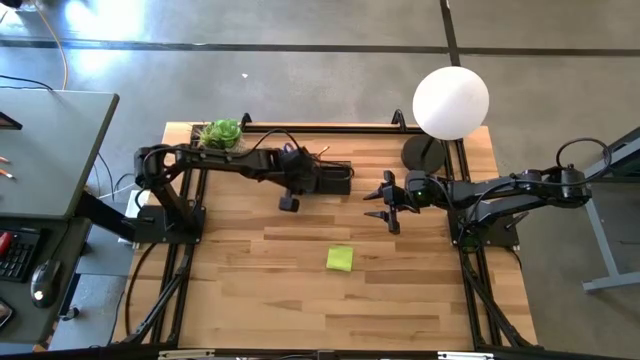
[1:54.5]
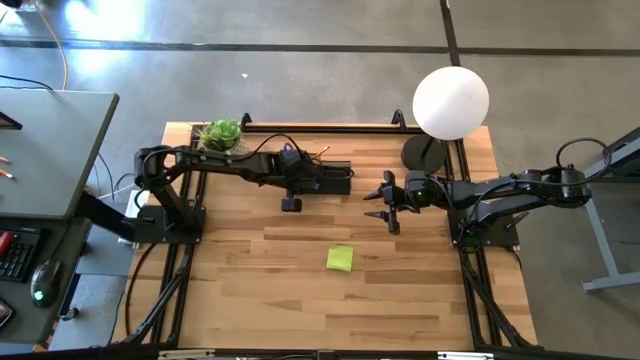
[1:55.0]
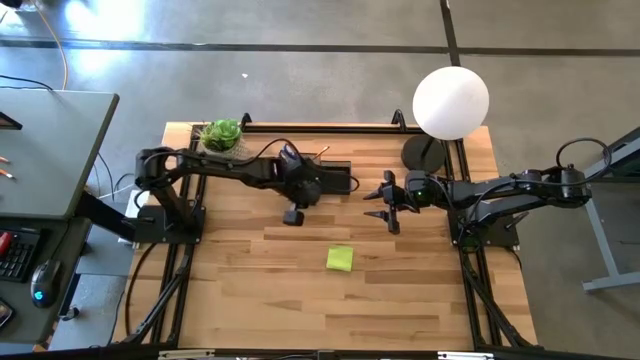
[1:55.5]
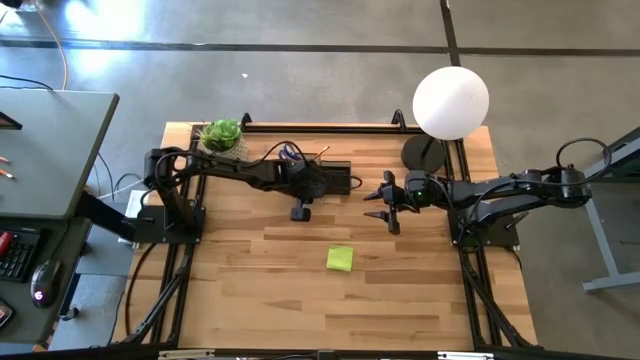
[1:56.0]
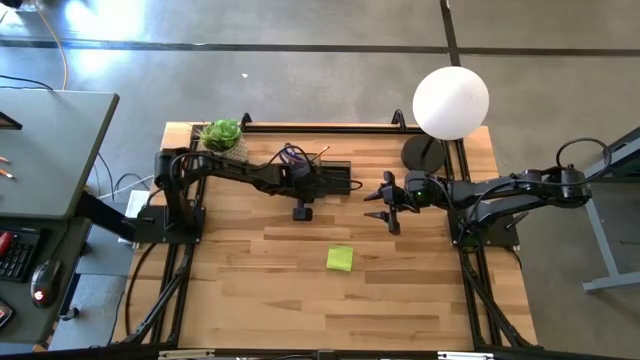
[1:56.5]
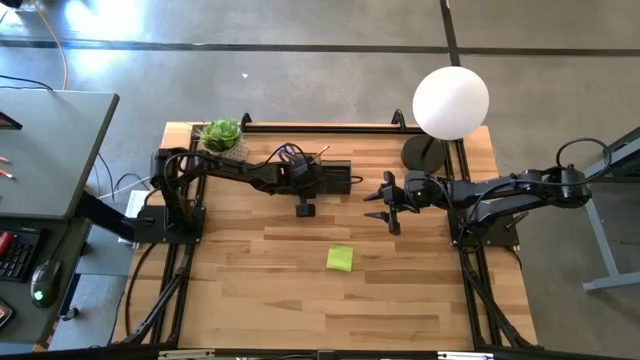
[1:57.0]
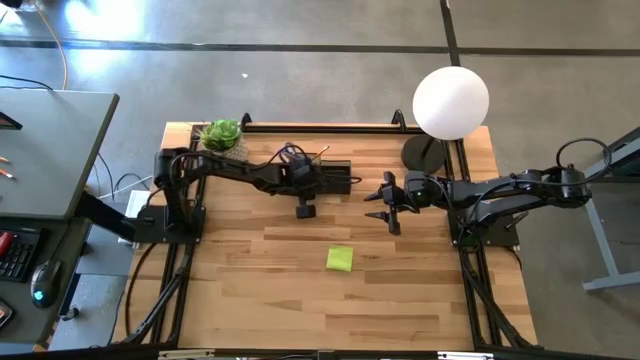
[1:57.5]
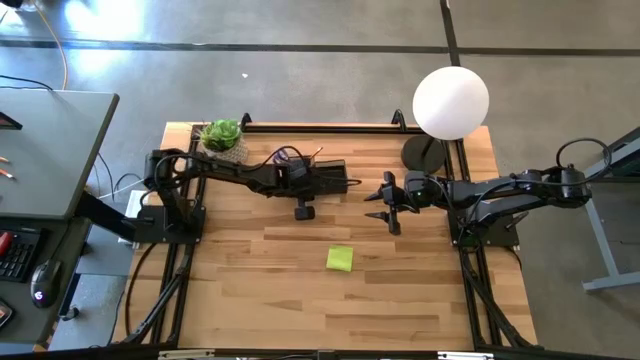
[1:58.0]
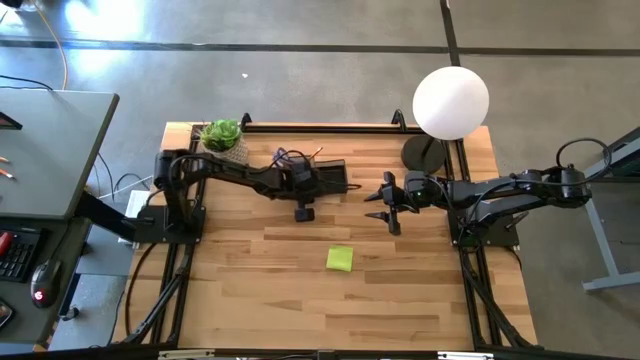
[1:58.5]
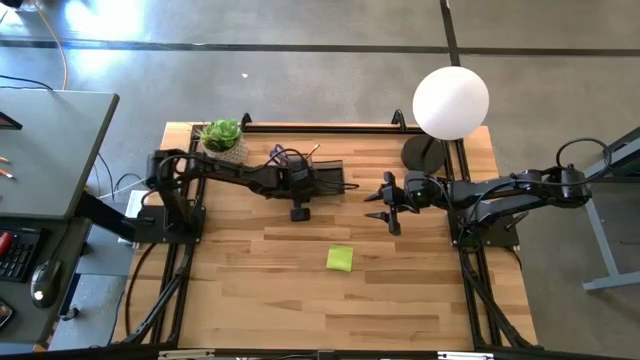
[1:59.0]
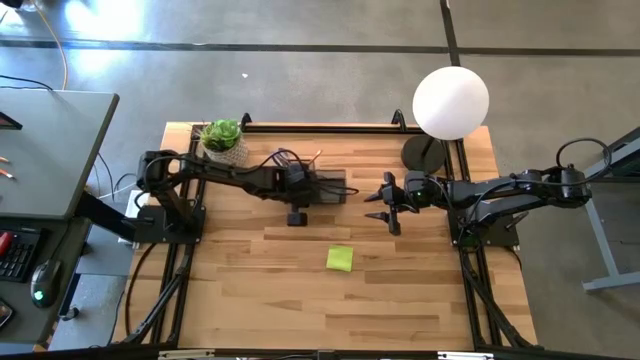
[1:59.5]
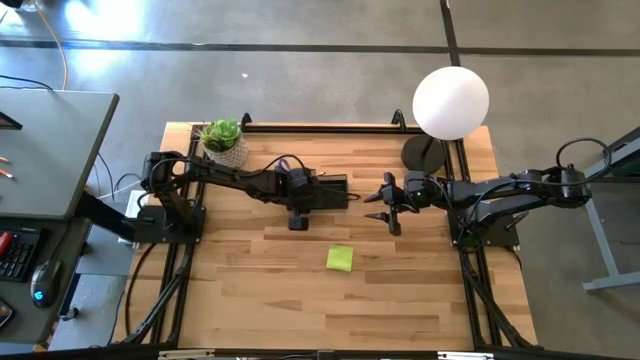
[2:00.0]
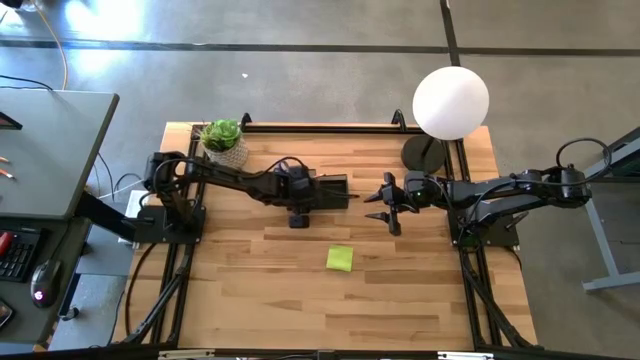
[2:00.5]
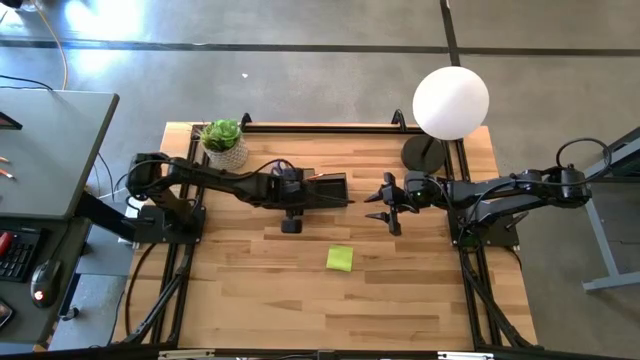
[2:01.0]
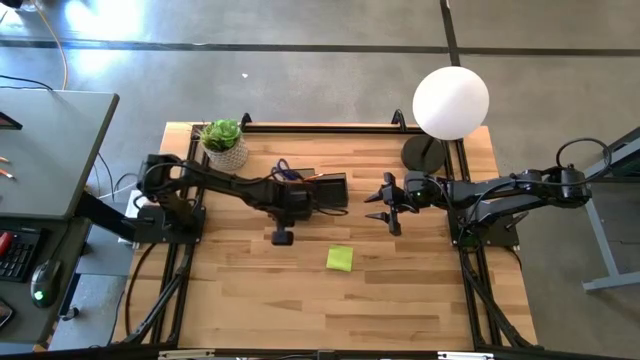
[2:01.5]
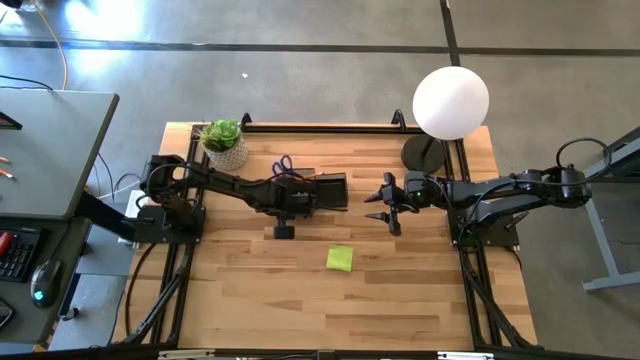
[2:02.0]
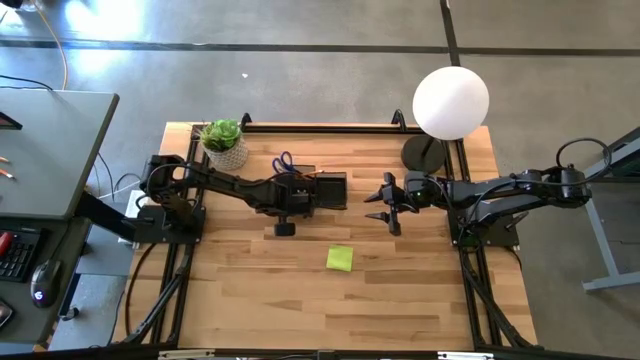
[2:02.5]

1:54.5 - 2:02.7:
Task: Pick and place office supplies into organizer
Adjust the black desk organizer

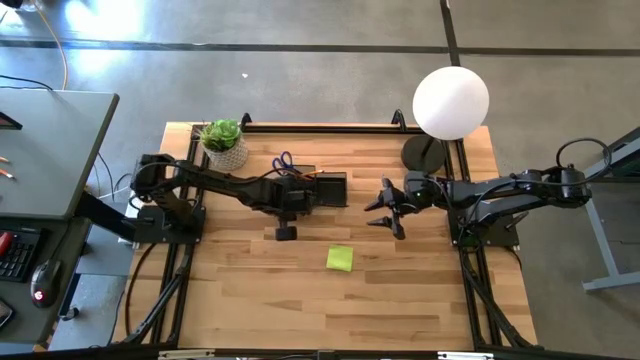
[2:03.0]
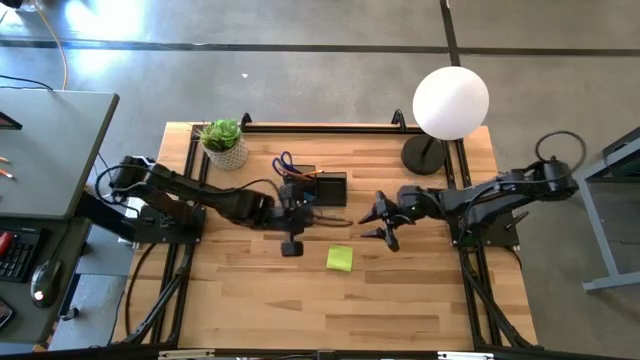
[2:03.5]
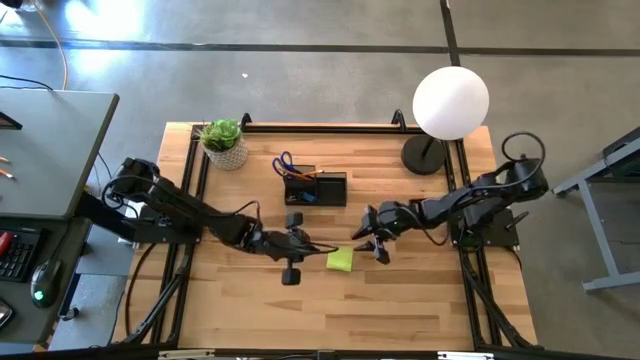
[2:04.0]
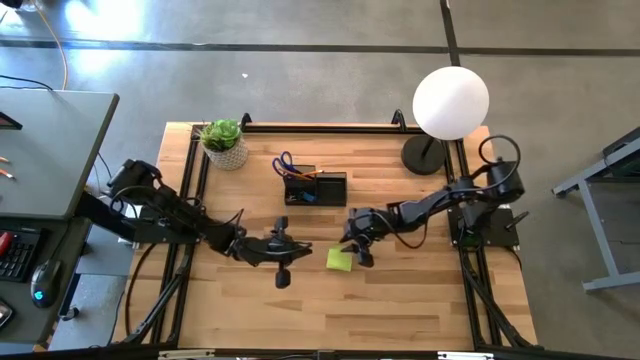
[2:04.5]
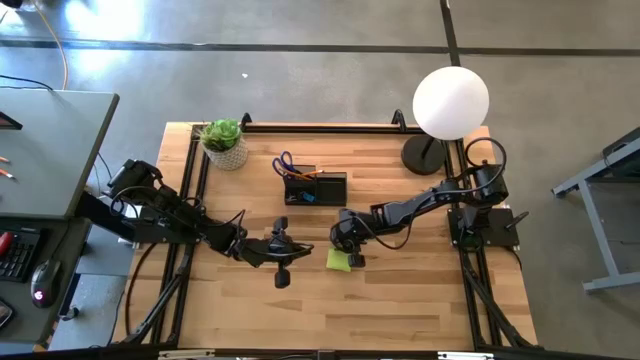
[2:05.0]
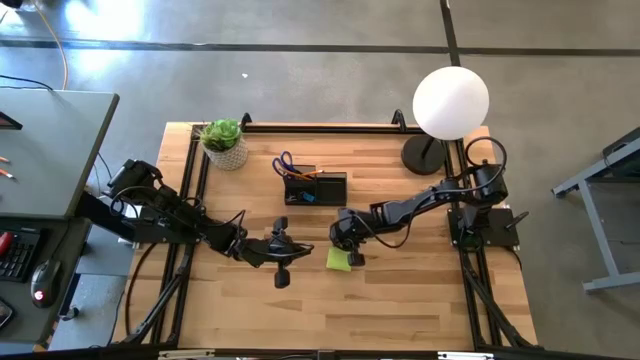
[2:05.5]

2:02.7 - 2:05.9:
Put the green sticky notes into the black desk organizer

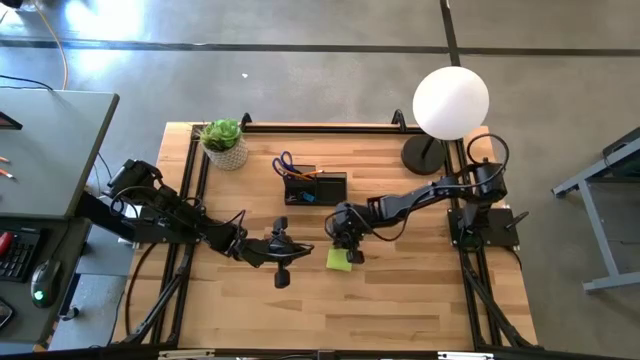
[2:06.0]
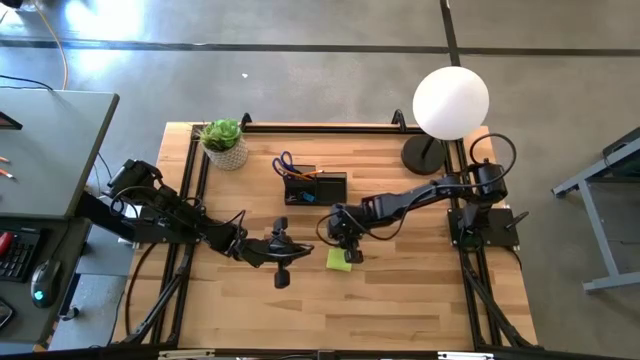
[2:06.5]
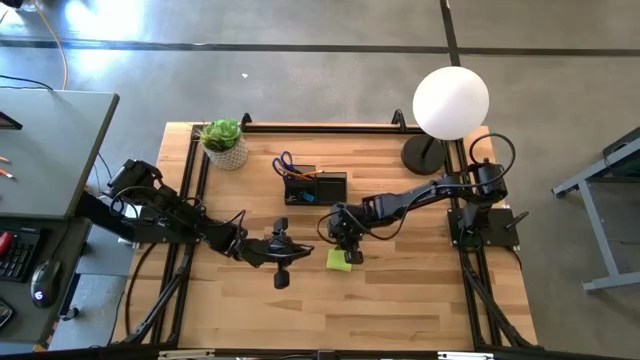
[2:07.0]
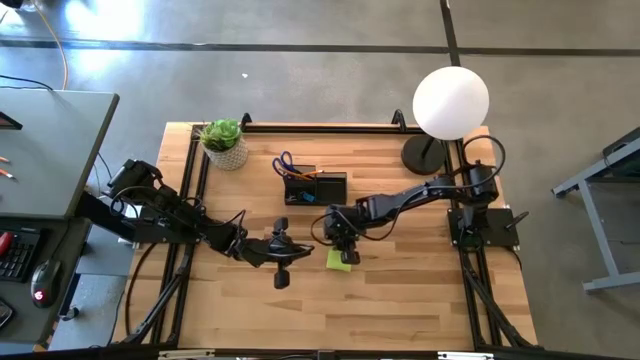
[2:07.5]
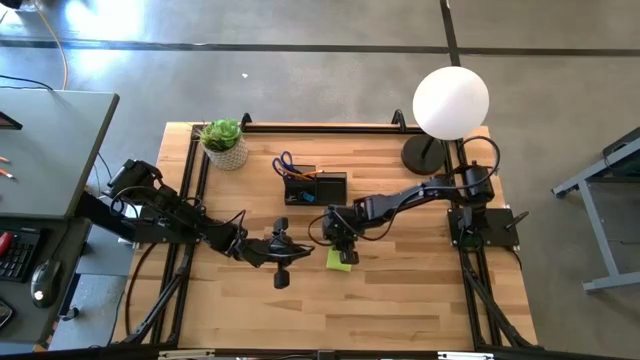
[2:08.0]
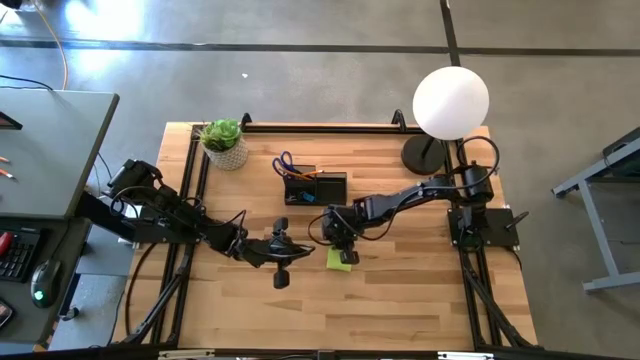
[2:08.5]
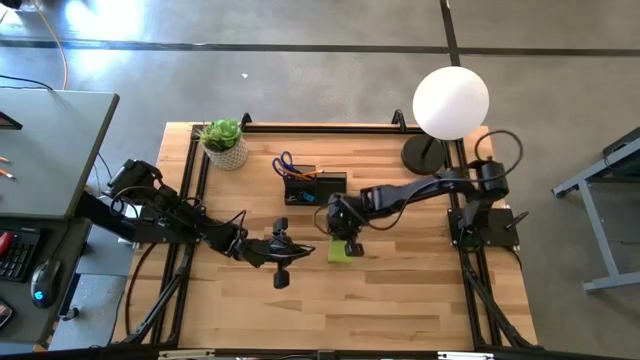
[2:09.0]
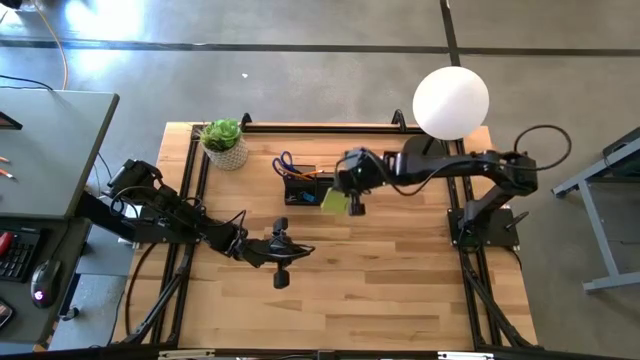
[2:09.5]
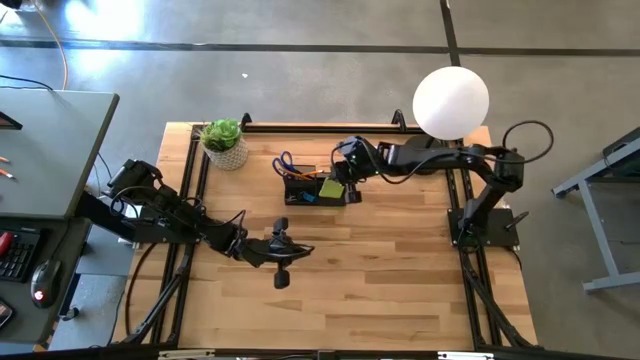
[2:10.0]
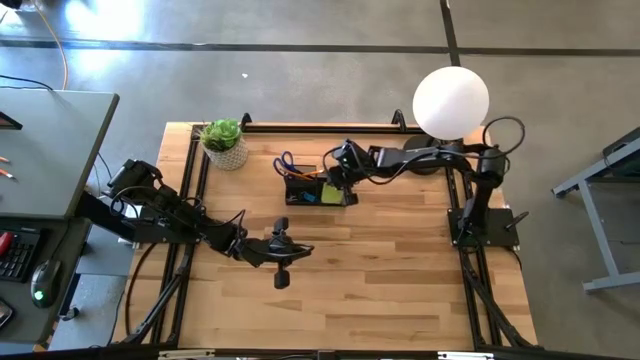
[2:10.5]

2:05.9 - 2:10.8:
Put the green sticky notes into the black desk organizer

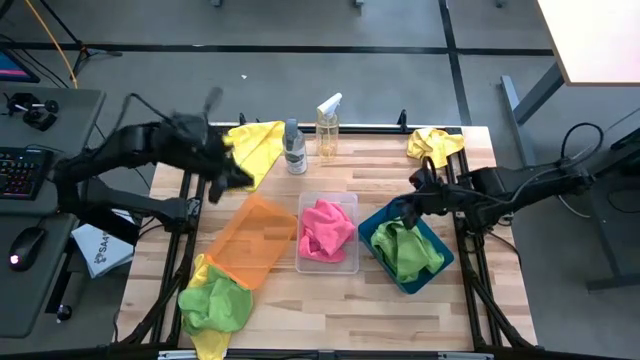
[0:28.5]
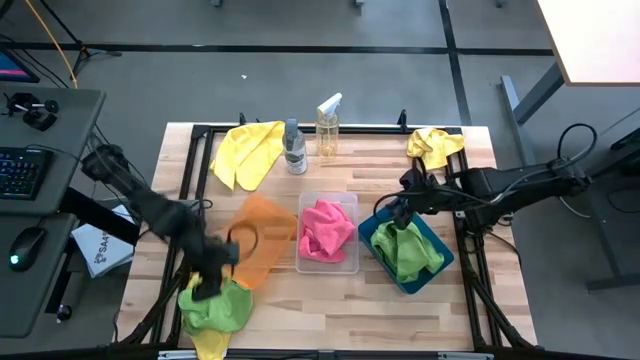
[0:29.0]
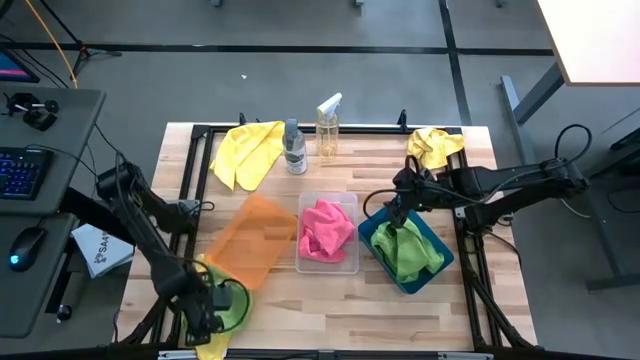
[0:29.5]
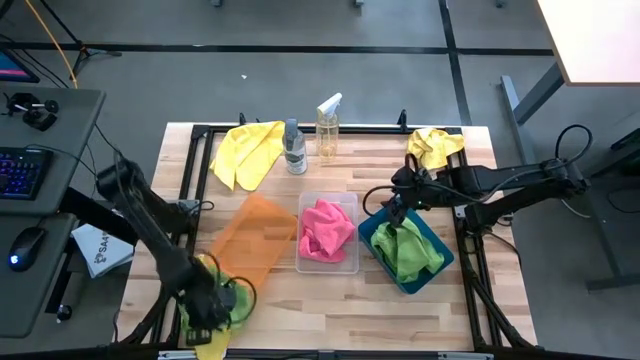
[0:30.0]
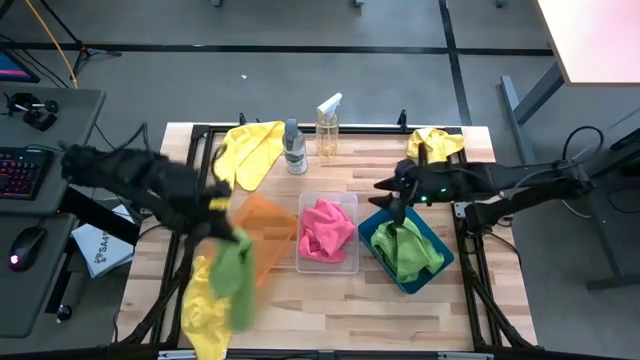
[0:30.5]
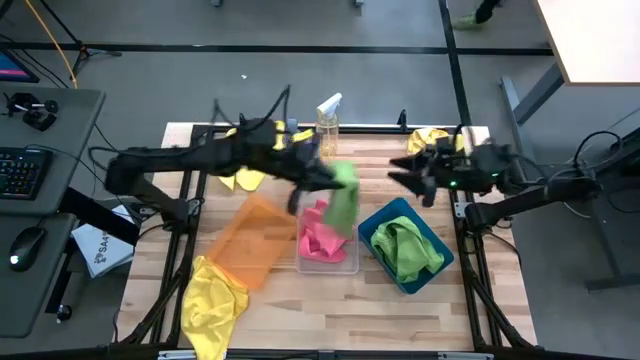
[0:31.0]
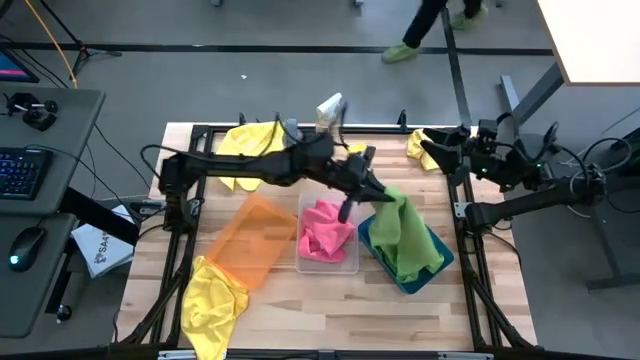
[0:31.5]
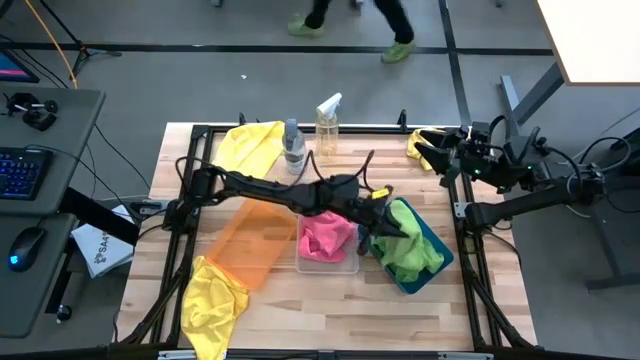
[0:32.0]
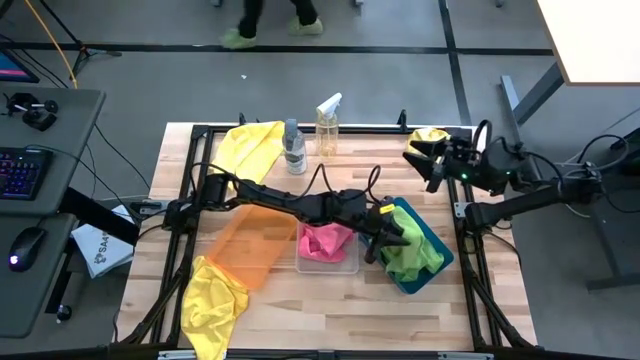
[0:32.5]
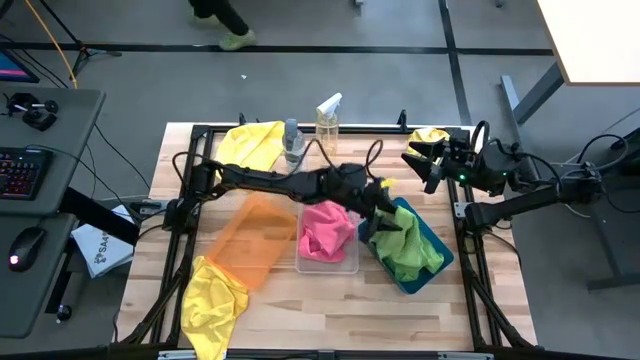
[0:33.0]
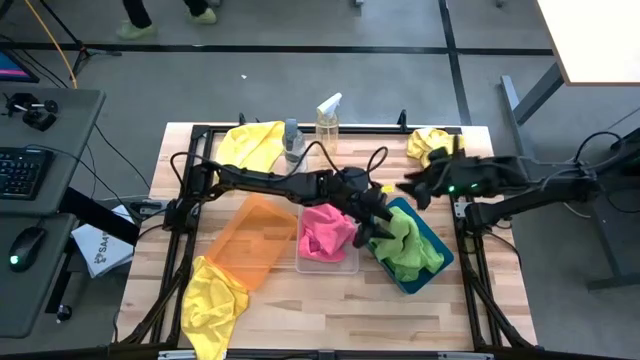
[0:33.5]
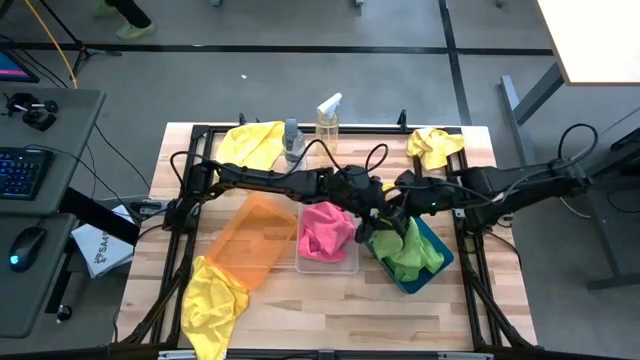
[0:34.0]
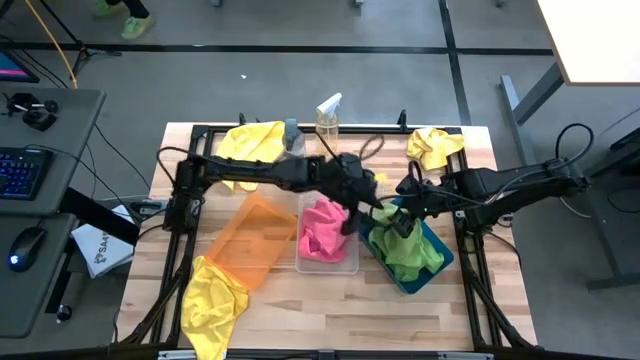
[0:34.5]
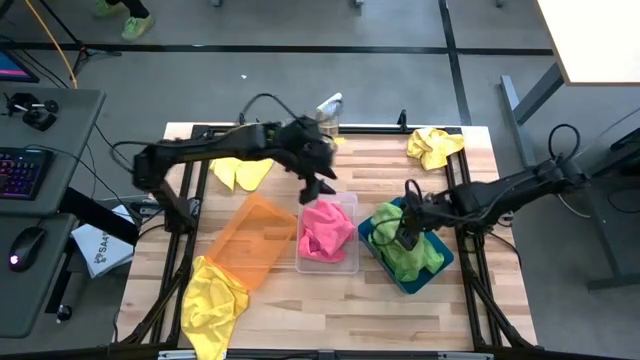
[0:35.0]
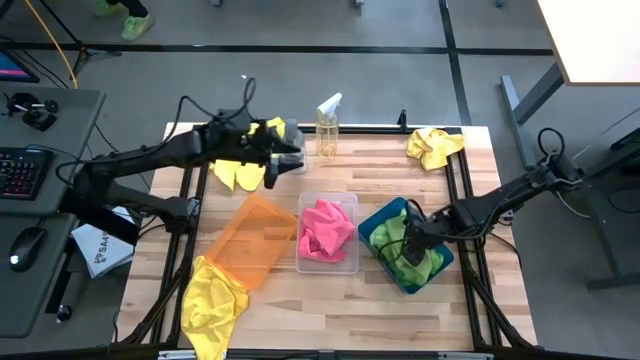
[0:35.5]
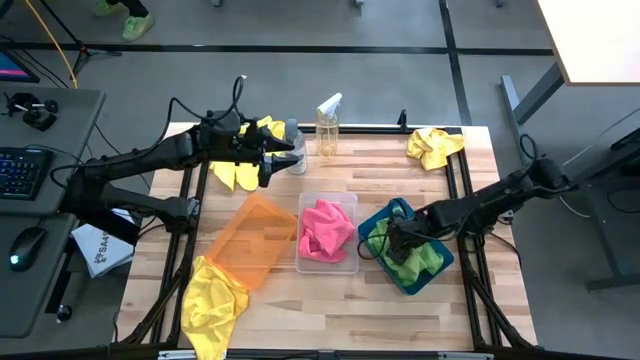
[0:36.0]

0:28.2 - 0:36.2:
Task: Sort microfiber towel by color & place in baskets
Put the green microfiber towel into the blue bin
